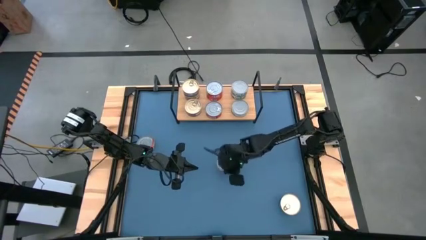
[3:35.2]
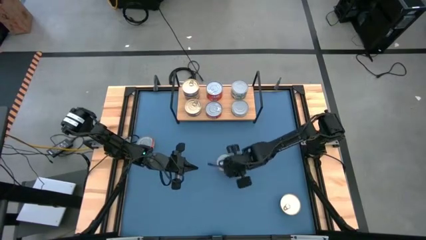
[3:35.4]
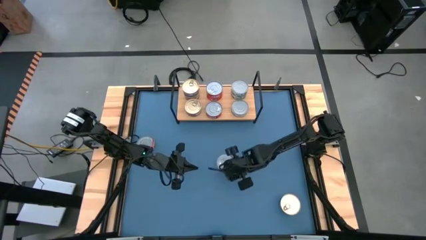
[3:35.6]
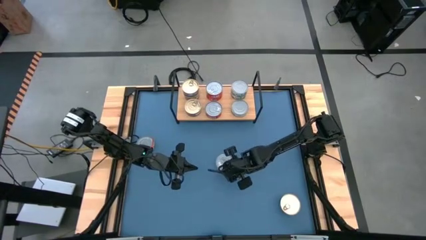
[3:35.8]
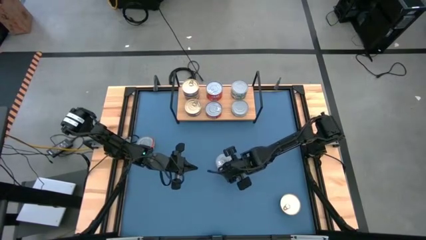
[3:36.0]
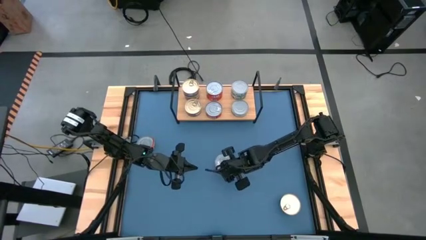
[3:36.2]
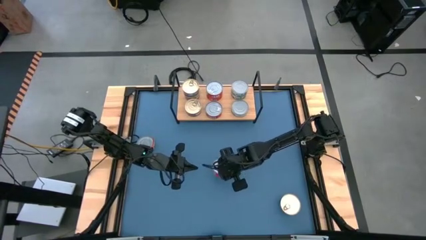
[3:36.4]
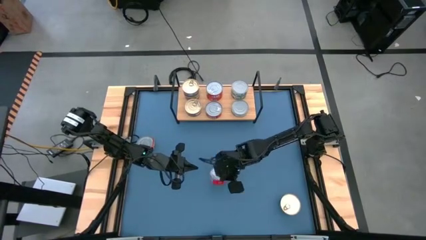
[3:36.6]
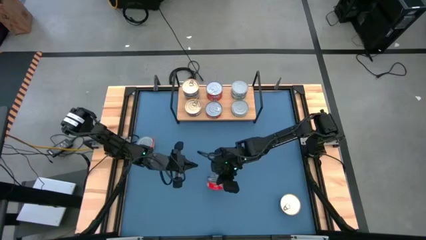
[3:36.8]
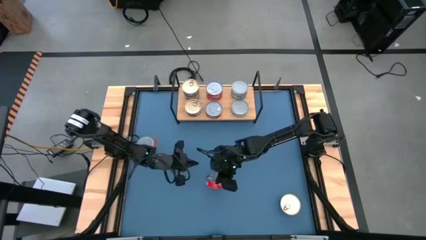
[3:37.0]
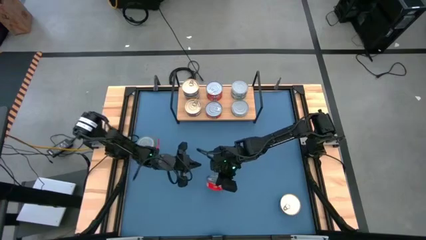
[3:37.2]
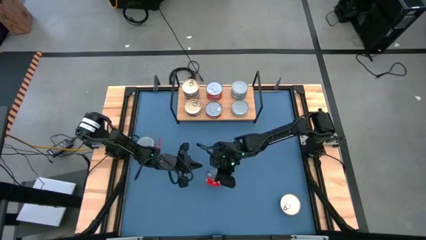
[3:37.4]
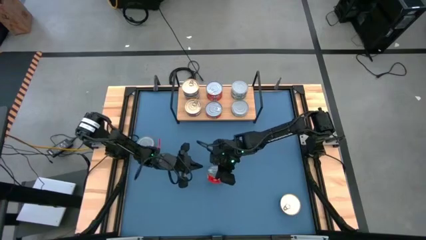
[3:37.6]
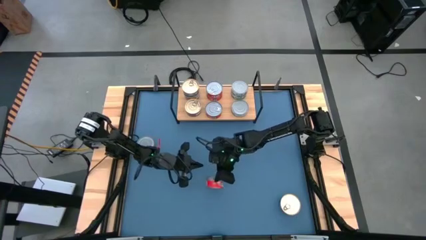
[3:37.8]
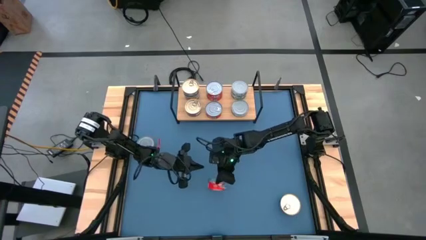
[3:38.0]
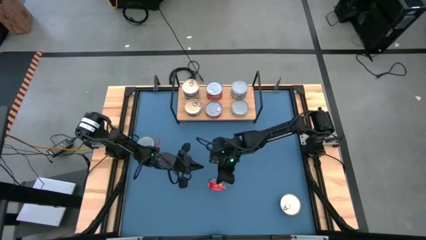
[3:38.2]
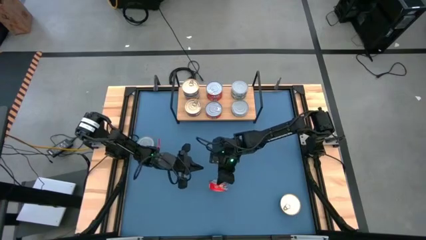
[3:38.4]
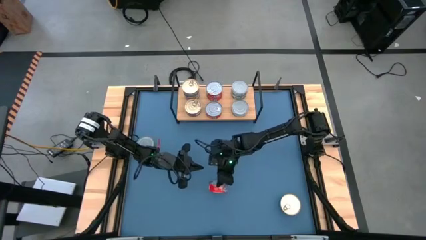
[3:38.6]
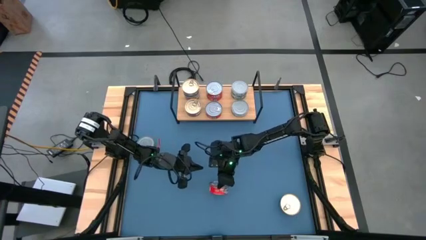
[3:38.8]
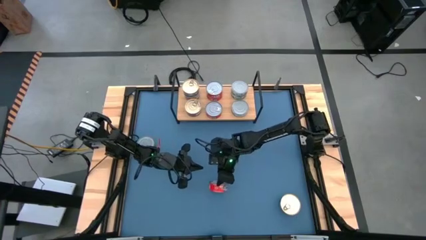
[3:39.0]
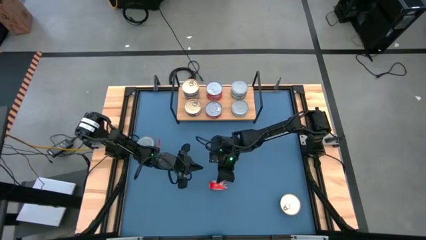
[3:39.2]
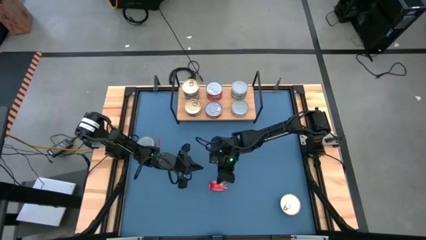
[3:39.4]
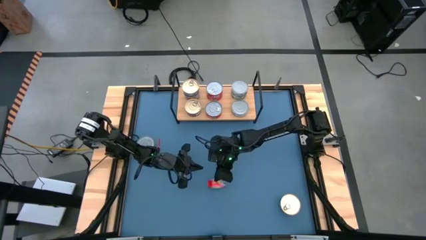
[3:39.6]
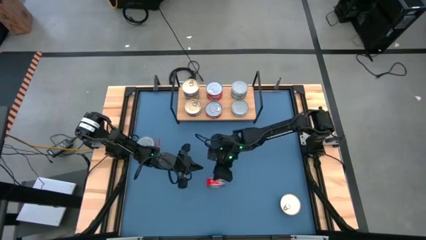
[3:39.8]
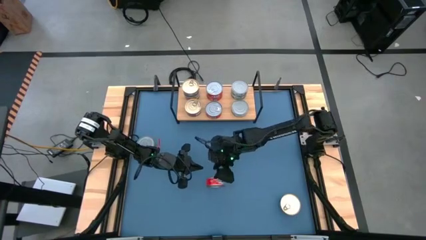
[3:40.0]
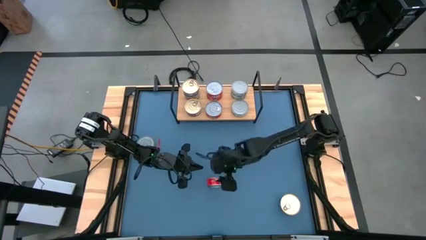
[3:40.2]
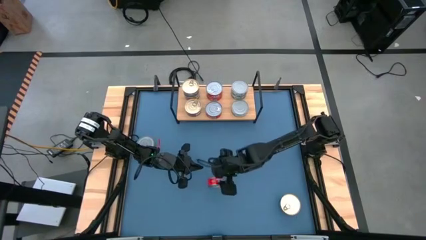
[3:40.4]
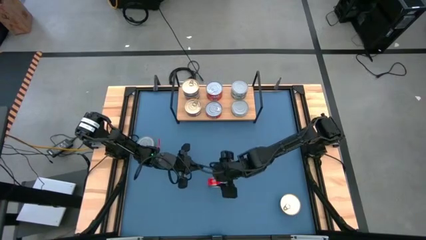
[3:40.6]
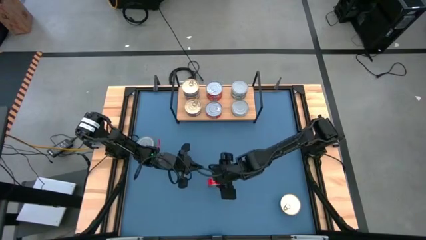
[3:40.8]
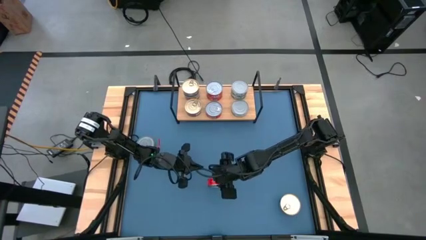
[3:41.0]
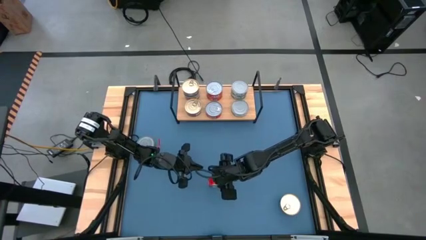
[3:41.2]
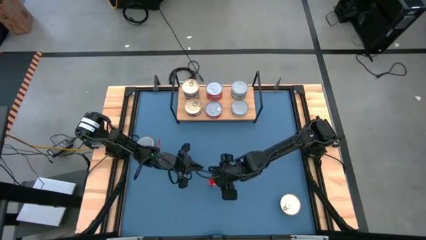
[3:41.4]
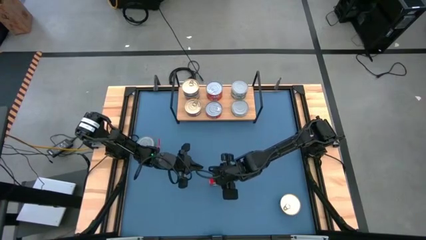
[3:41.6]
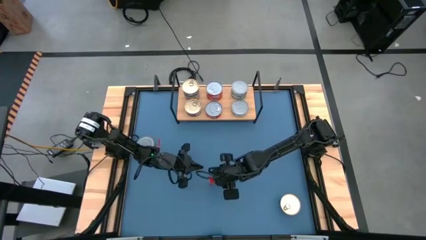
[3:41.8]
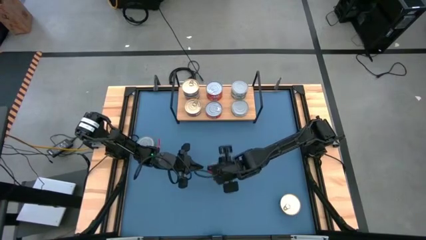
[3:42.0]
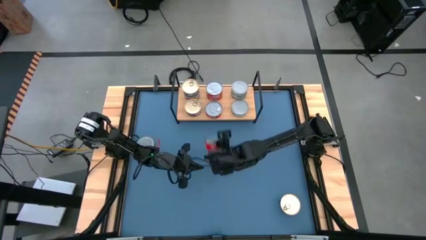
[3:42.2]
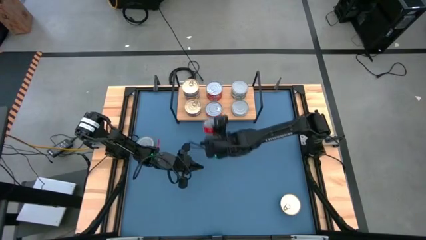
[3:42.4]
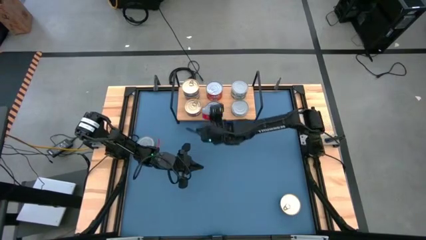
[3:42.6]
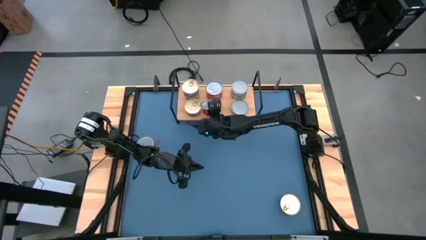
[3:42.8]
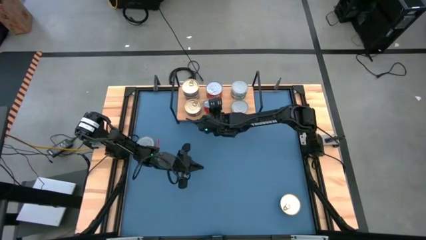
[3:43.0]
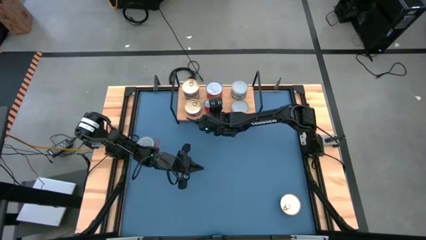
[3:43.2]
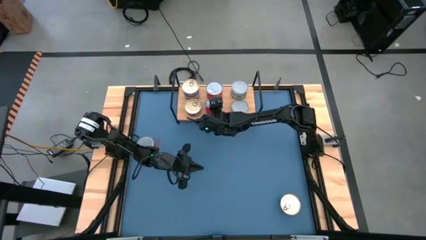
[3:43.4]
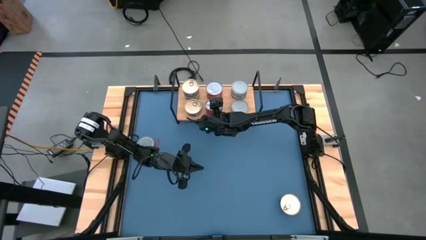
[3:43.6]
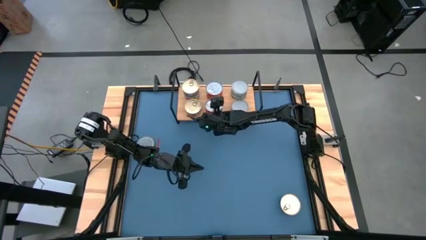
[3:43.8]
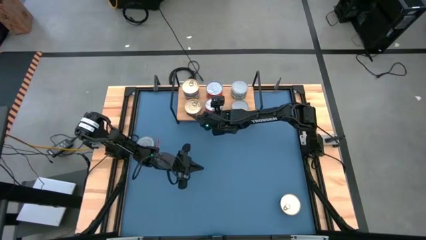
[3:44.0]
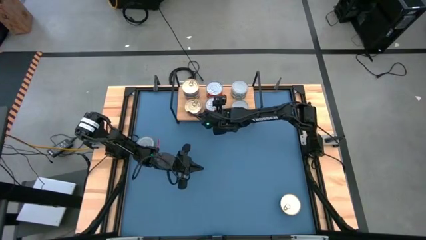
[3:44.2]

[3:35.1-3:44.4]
Task: Stack canned seafood by type on shelf
Stack the red tuna can on top of the other red tuna can on the shelf

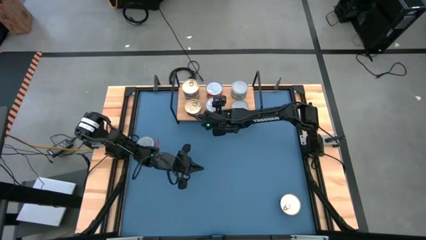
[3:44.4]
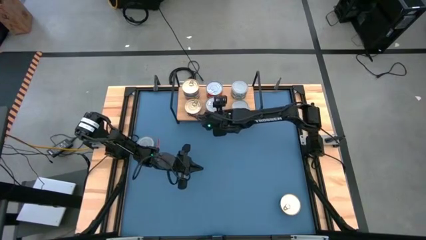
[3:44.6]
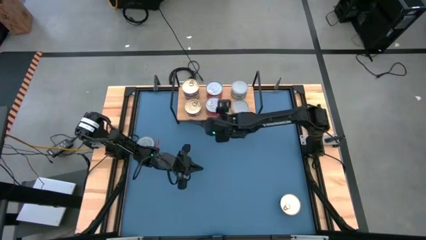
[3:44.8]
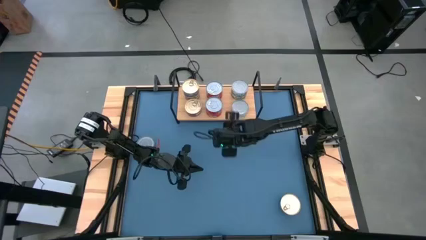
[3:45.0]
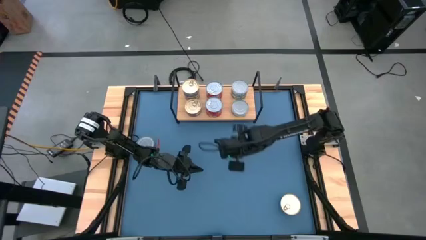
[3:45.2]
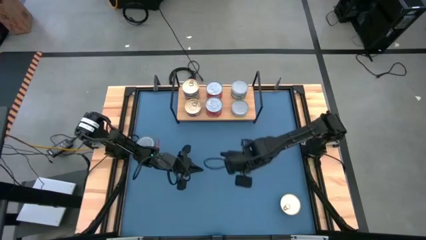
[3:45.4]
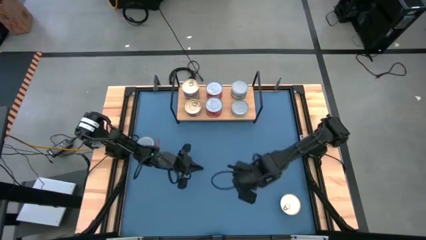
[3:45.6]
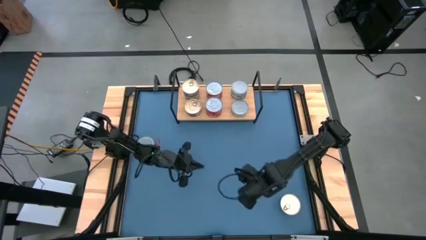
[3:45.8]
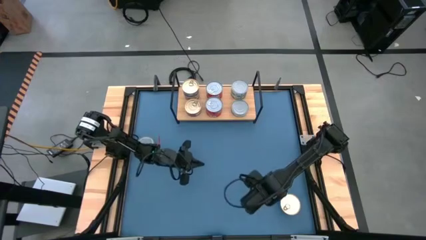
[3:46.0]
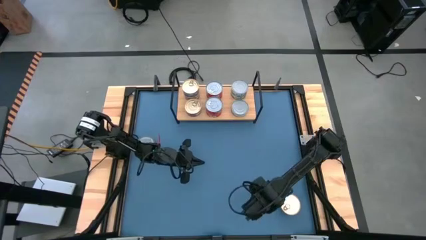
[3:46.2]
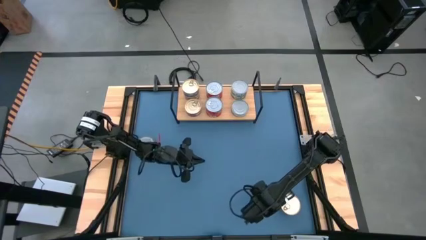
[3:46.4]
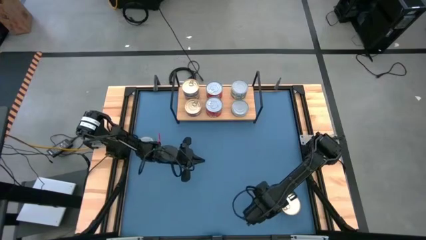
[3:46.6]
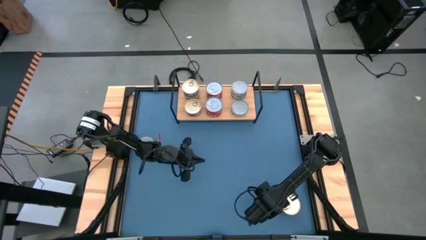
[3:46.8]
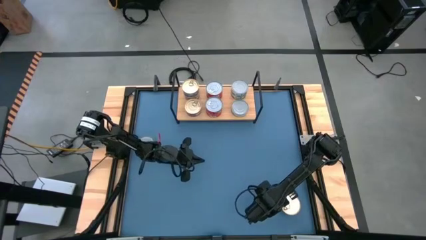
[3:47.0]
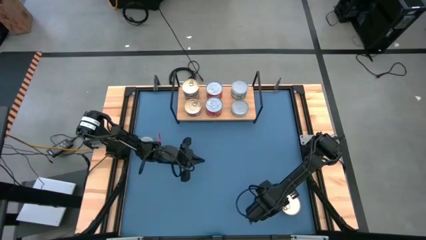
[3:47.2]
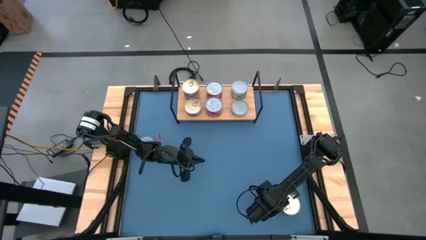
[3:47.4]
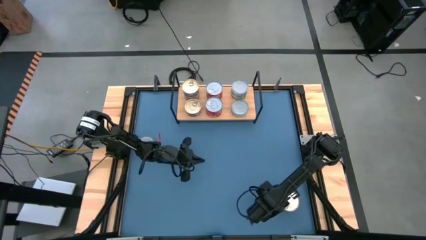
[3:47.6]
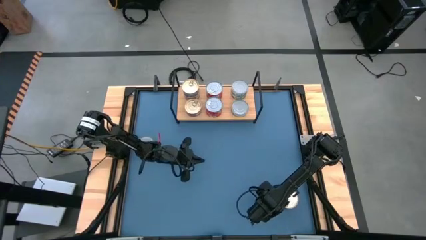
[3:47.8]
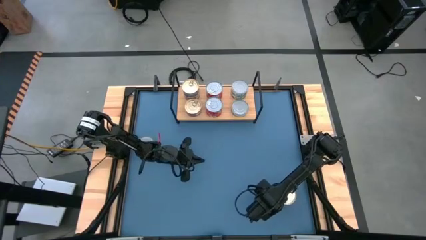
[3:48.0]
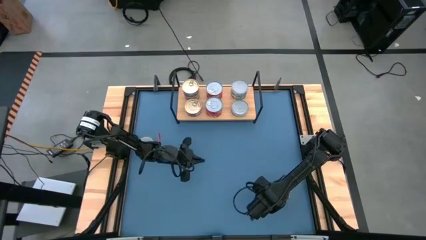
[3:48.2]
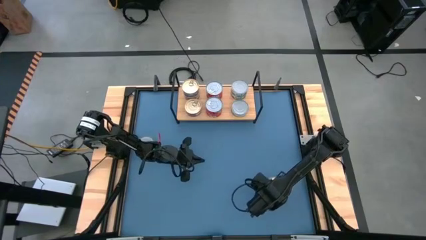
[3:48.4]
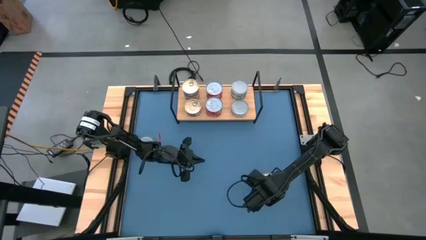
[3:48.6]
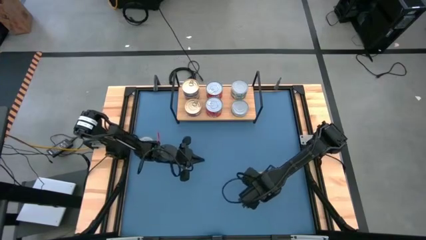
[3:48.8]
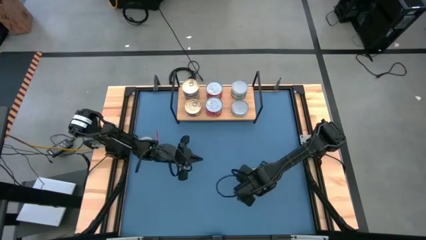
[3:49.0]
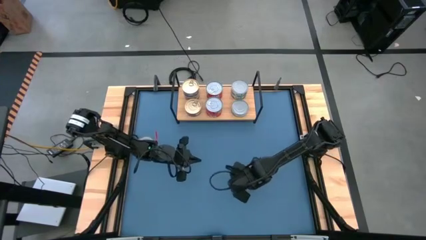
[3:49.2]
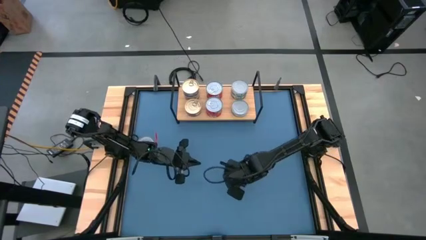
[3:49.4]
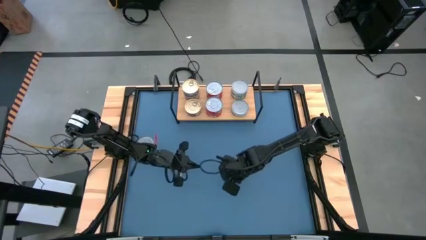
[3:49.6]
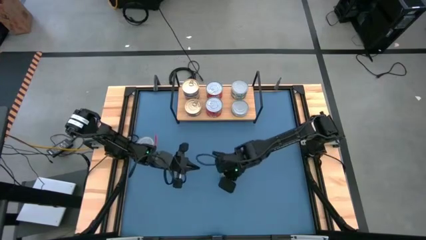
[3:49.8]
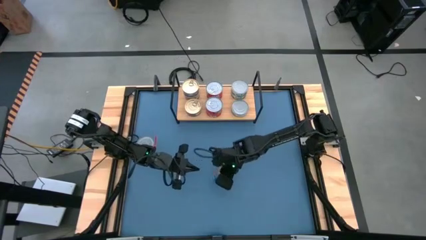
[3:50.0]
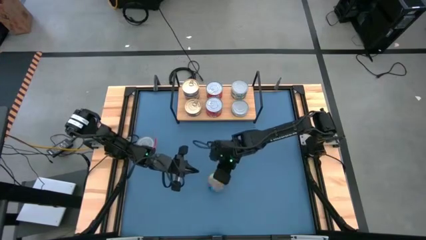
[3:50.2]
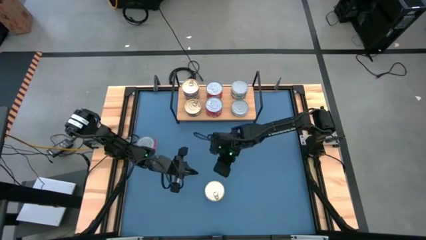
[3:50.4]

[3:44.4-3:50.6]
Stack the blue tuna can on top of the other blue tuna can on the shelf
